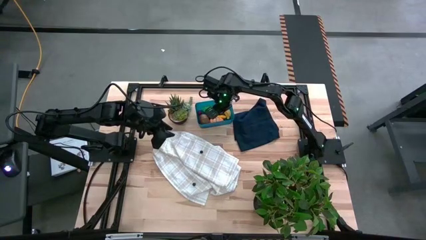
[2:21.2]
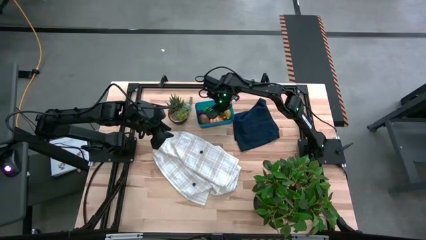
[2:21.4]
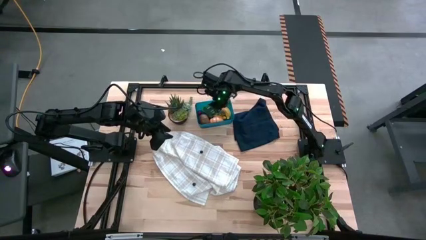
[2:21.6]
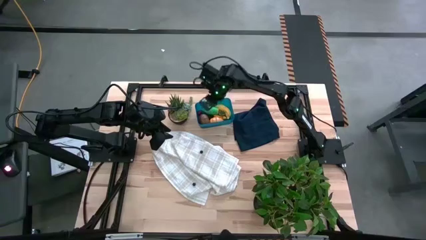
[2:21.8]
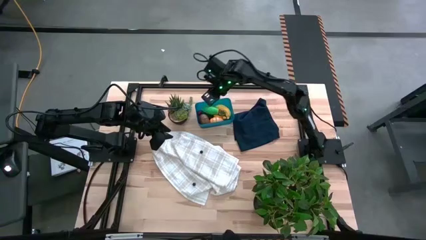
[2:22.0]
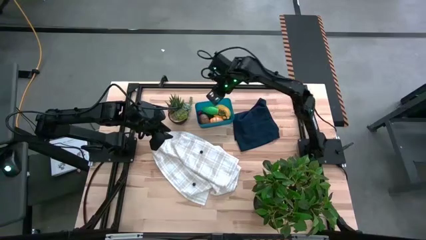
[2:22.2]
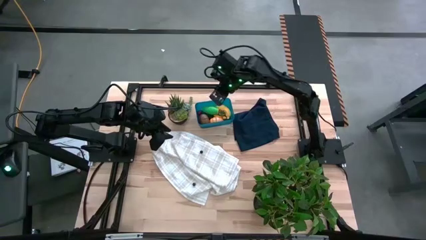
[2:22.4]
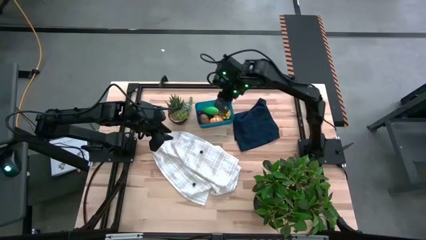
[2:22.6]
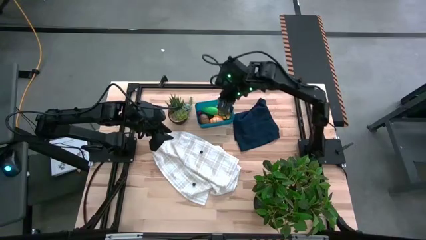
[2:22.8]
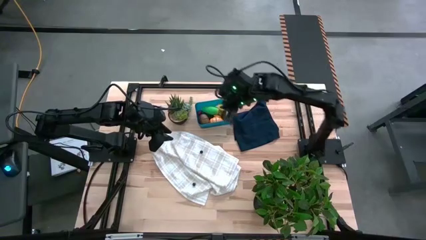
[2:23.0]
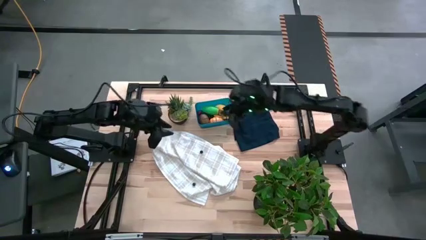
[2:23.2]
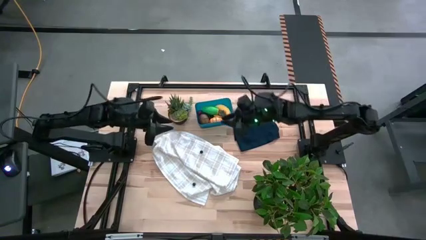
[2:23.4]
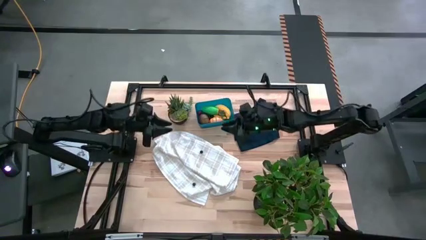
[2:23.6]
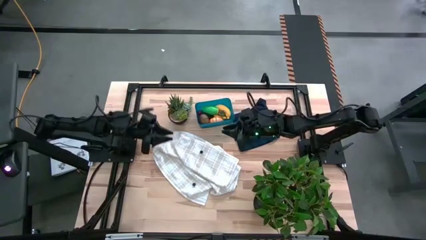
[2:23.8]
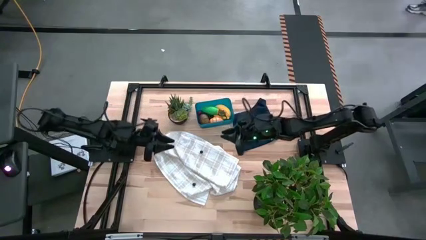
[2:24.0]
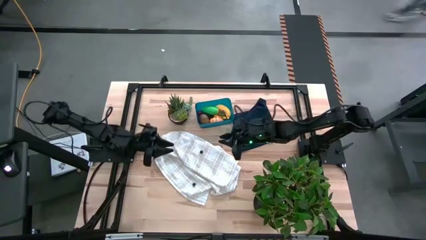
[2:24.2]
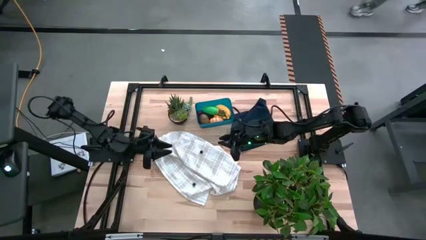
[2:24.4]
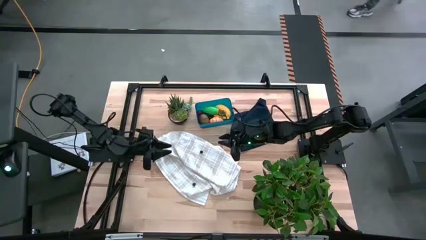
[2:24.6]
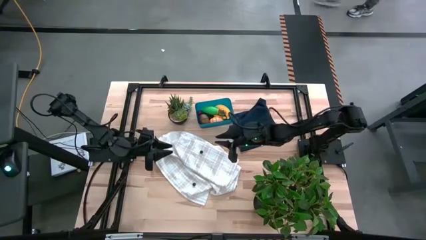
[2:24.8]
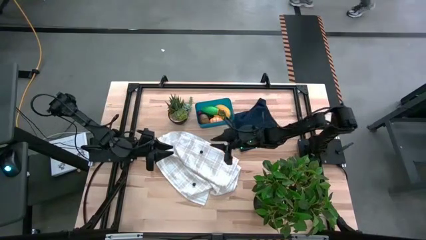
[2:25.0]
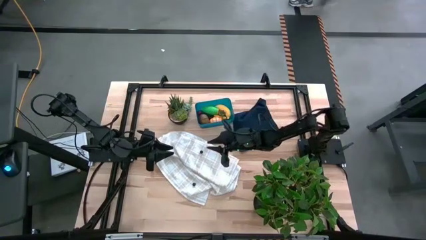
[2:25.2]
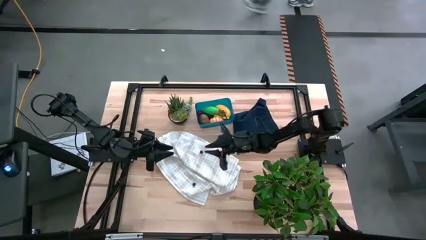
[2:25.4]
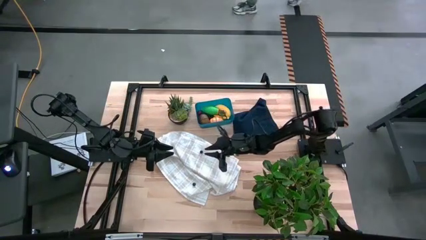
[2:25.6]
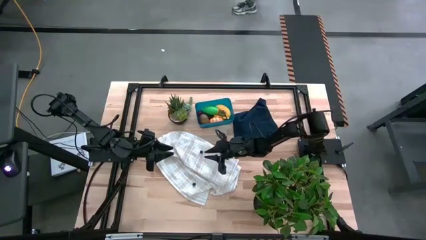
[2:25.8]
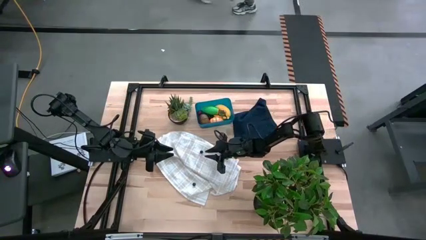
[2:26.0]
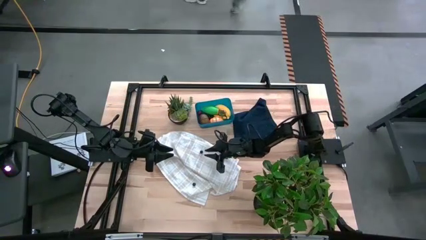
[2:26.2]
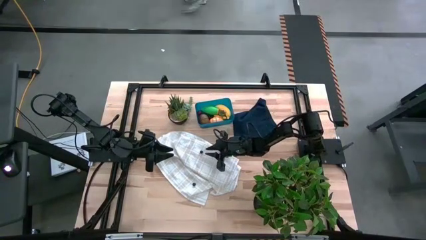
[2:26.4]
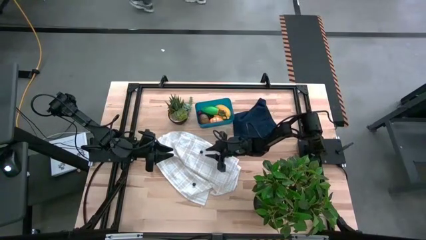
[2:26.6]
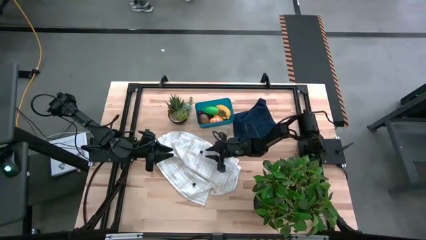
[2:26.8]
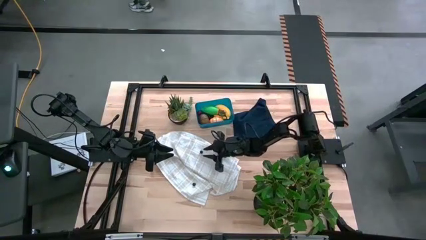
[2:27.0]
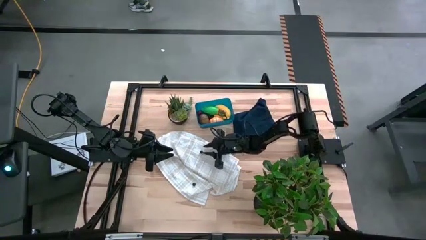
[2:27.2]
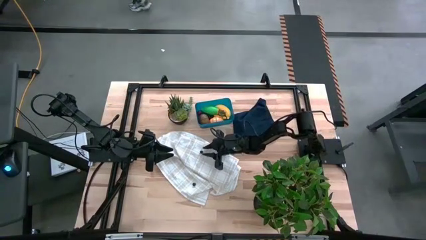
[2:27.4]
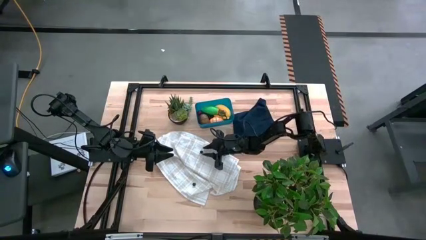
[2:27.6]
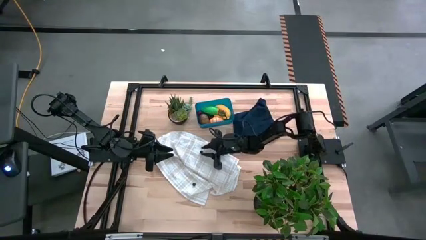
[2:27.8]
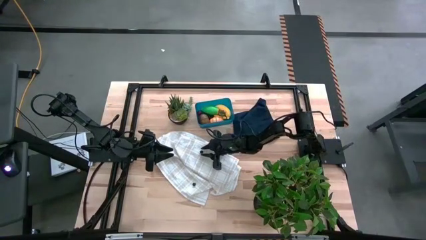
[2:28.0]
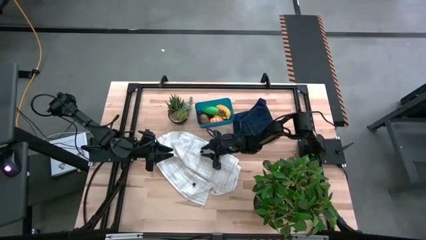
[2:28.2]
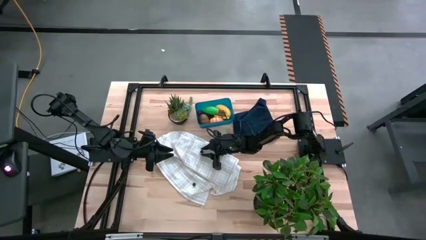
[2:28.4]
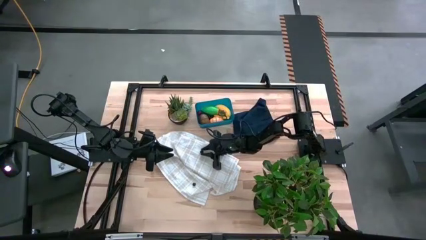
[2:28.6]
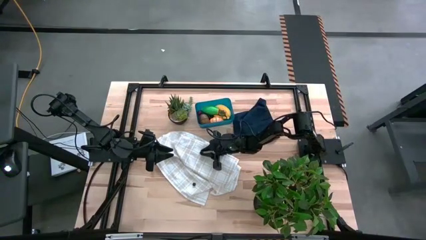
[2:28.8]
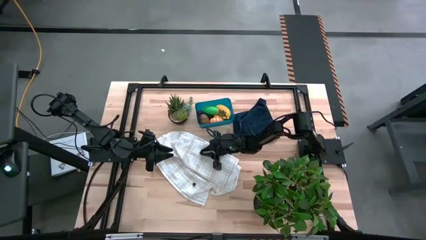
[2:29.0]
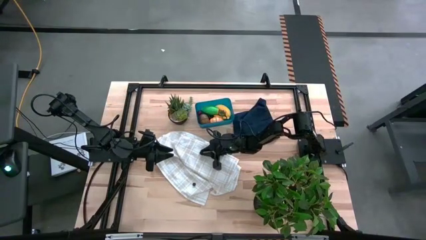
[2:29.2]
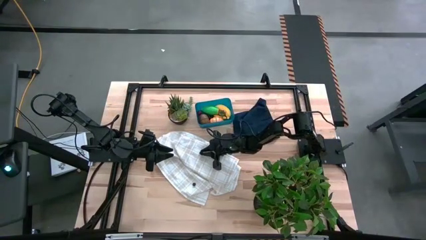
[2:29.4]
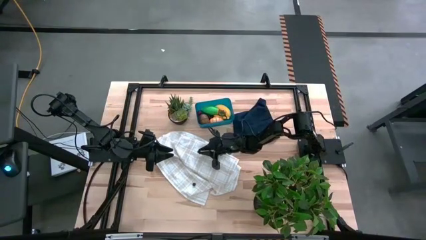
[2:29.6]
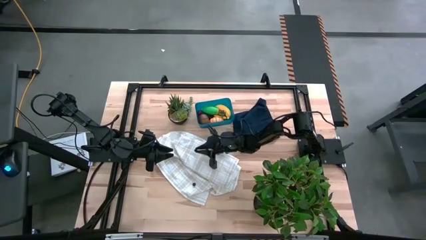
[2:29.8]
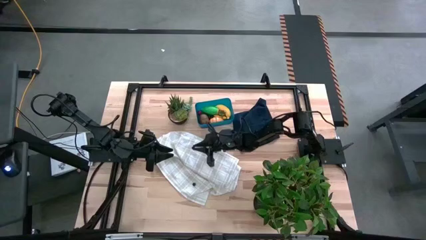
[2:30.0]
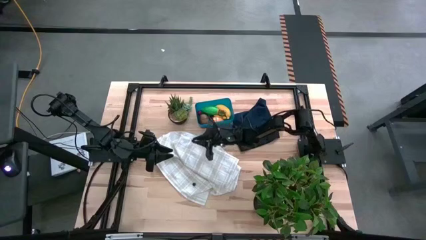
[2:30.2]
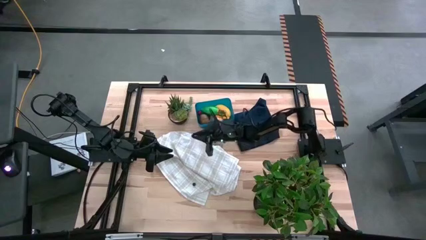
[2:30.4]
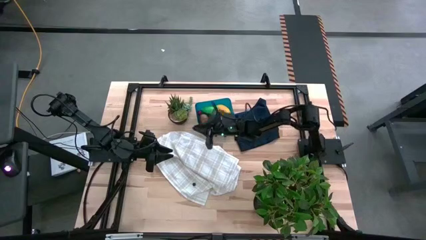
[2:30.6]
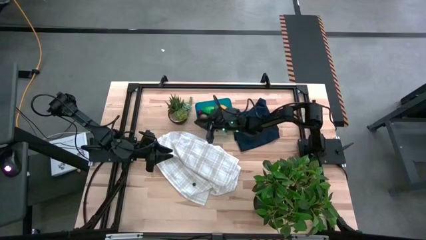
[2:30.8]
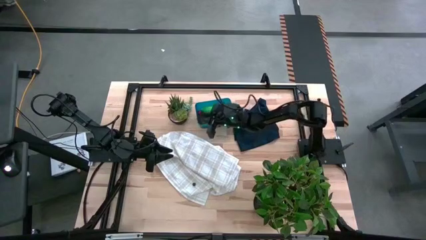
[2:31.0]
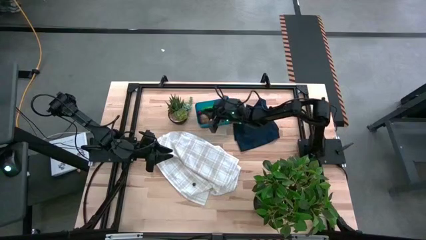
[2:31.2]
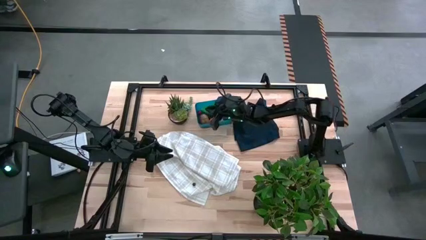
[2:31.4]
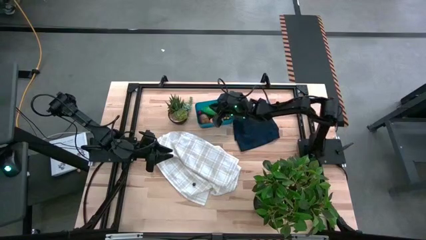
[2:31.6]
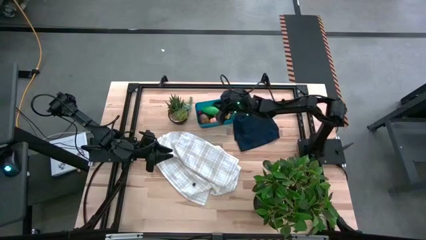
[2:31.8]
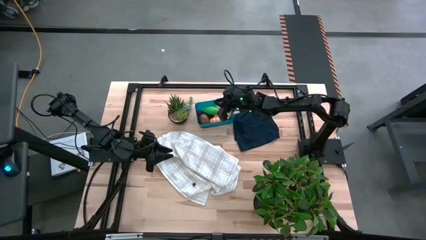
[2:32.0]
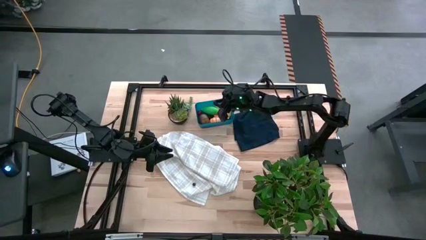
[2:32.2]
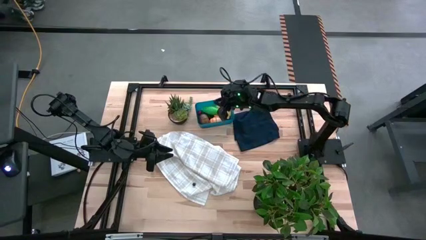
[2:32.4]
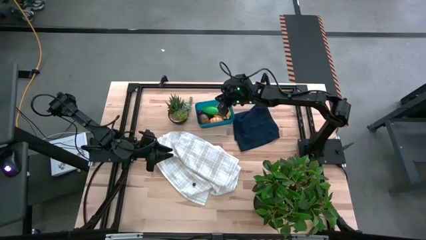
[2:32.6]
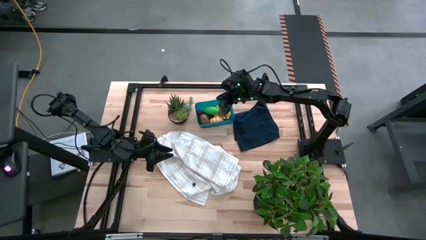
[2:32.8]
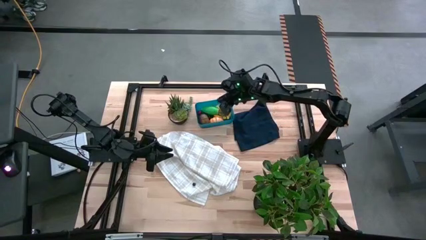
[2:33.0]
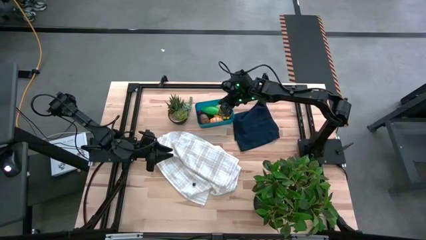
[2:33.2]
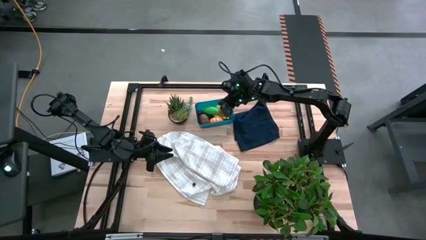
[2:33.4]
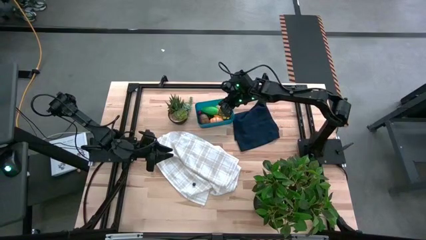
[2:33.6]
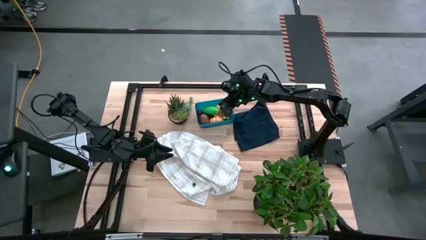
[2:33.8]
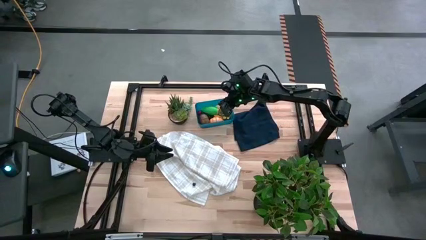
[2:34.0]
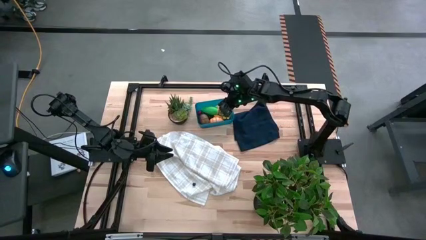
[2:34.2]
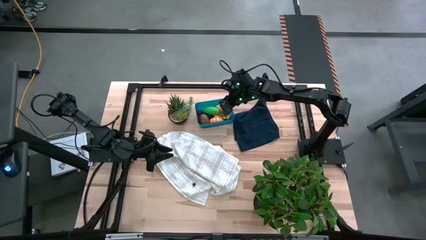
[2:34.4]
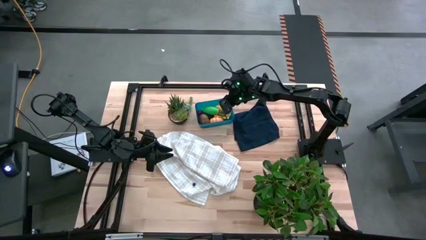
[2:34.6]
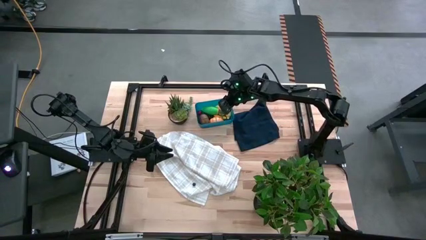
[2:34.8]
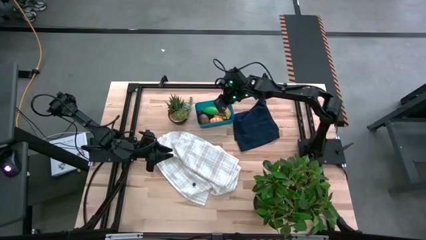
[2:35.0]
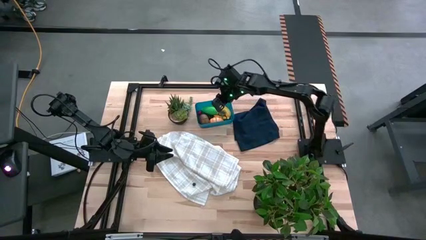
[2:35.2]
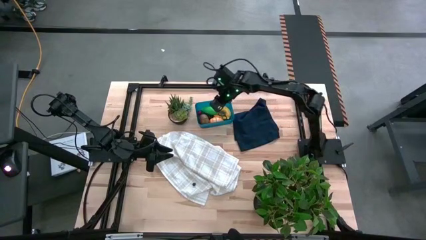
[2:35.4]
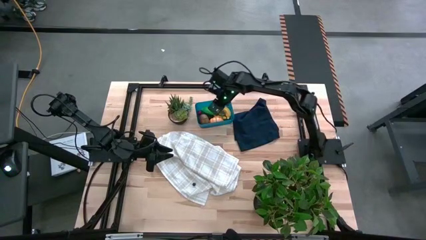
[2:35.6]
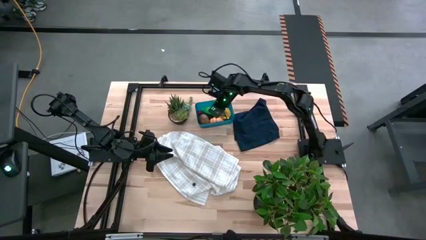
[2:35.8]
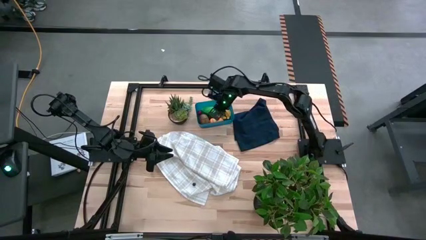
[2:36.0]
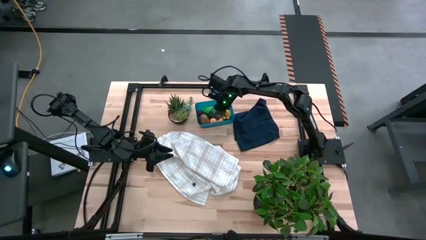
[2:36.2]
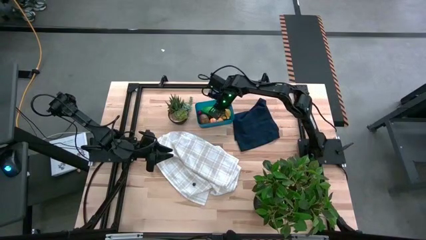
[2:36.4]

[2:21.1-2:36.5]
Task: Pick and placing Produce into tupperware
Put the top blueberry into the blue bin
